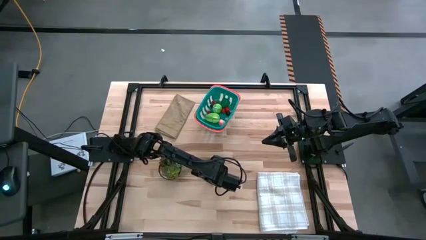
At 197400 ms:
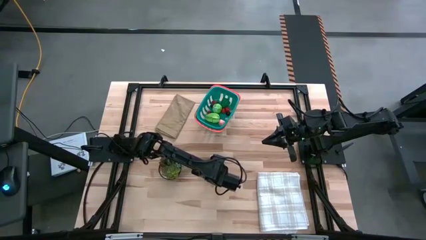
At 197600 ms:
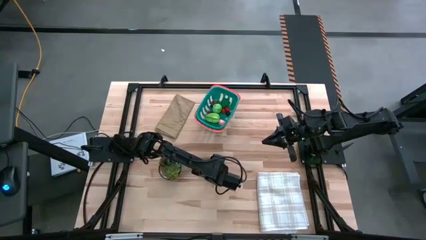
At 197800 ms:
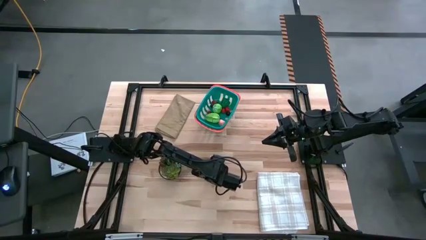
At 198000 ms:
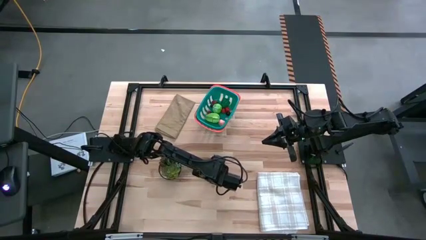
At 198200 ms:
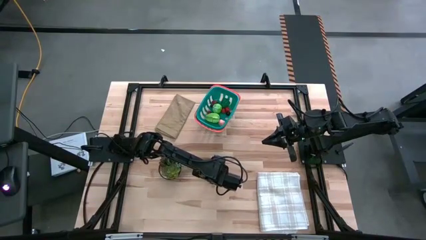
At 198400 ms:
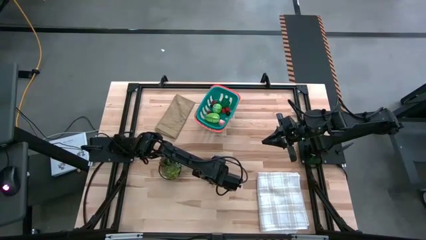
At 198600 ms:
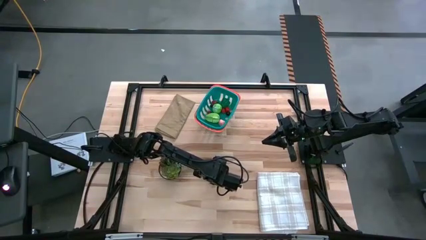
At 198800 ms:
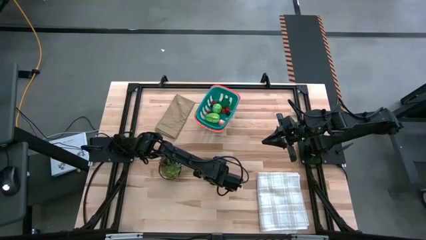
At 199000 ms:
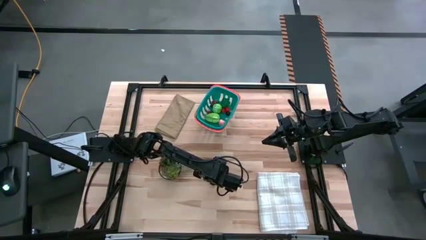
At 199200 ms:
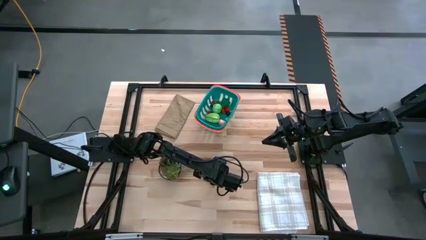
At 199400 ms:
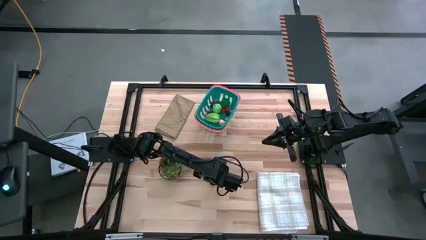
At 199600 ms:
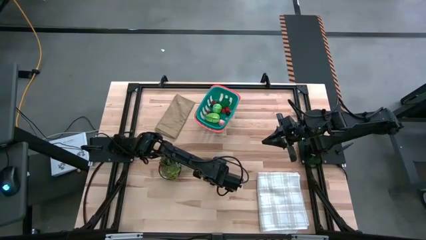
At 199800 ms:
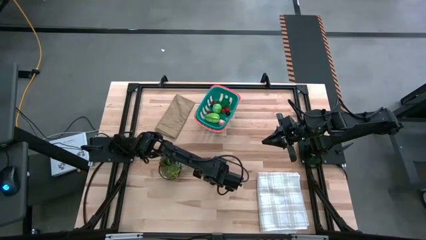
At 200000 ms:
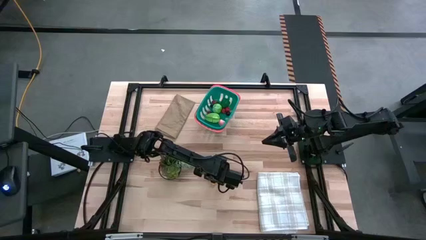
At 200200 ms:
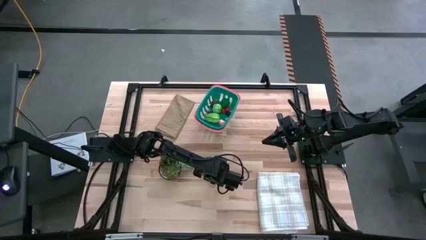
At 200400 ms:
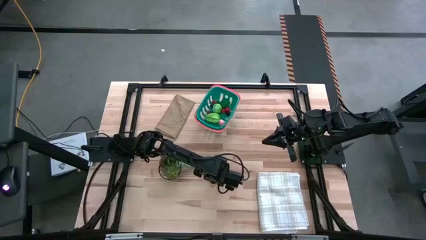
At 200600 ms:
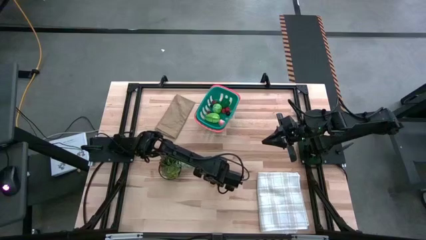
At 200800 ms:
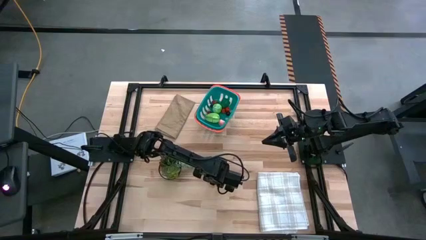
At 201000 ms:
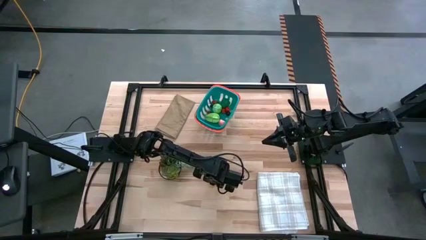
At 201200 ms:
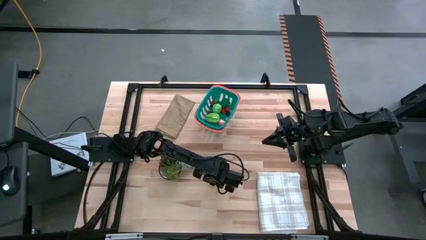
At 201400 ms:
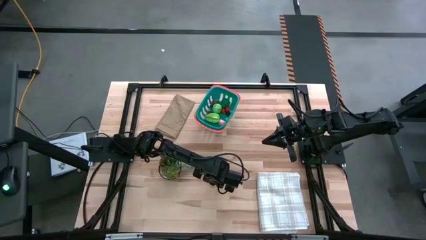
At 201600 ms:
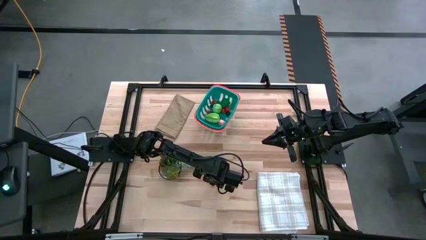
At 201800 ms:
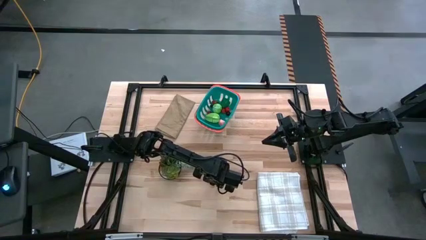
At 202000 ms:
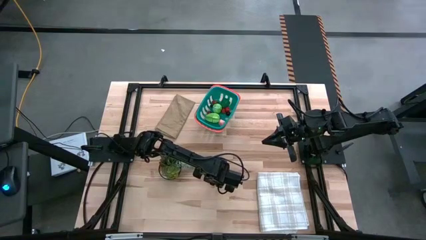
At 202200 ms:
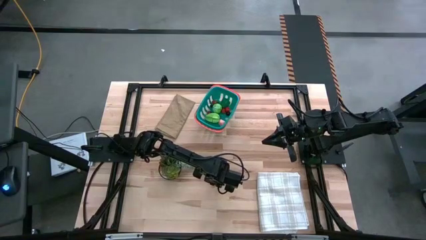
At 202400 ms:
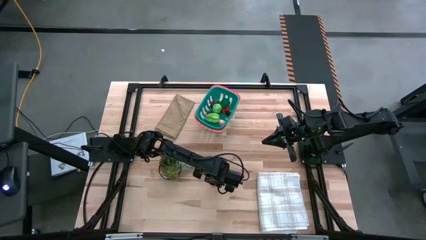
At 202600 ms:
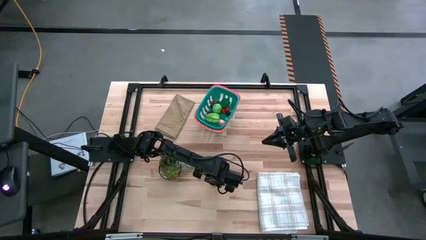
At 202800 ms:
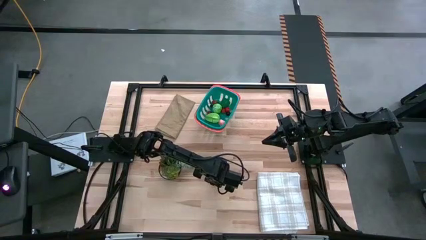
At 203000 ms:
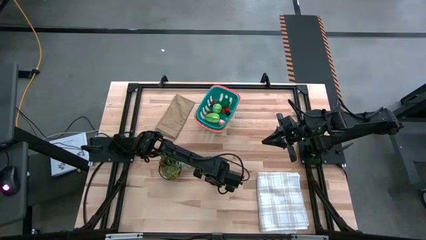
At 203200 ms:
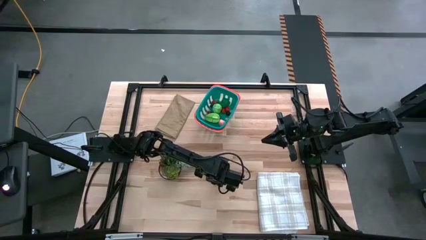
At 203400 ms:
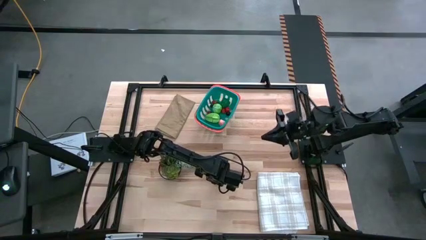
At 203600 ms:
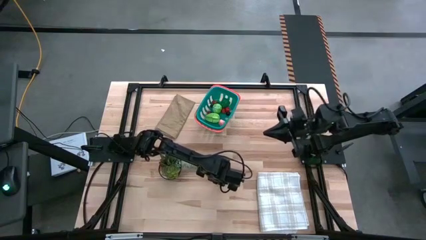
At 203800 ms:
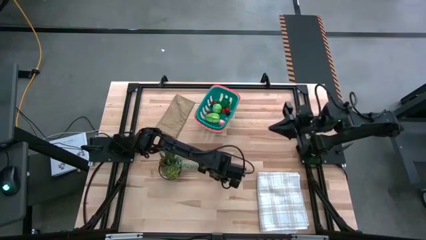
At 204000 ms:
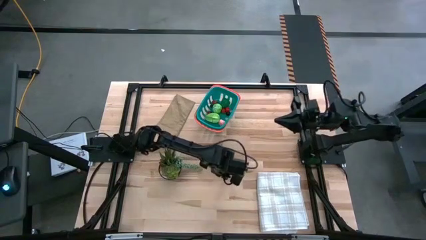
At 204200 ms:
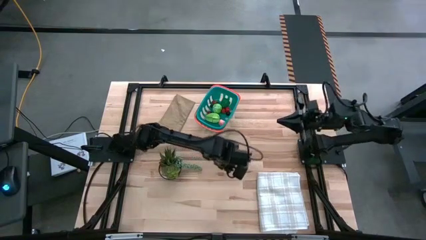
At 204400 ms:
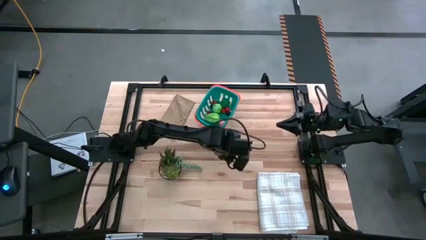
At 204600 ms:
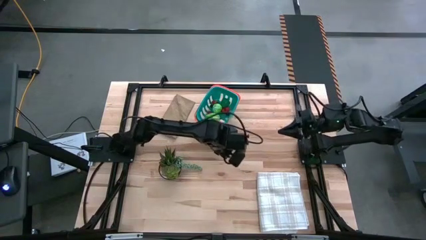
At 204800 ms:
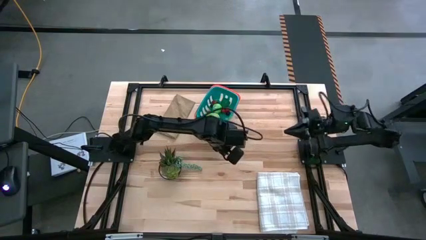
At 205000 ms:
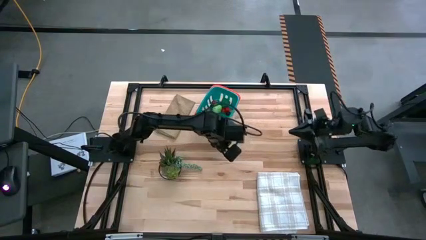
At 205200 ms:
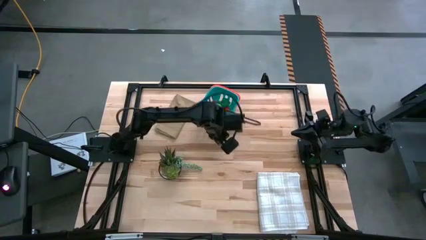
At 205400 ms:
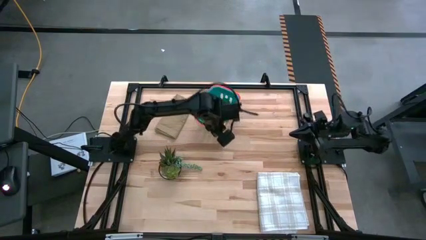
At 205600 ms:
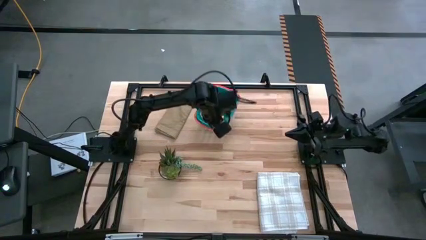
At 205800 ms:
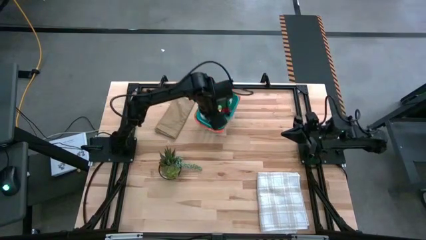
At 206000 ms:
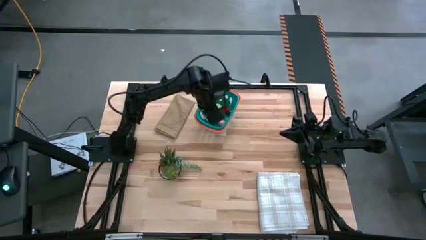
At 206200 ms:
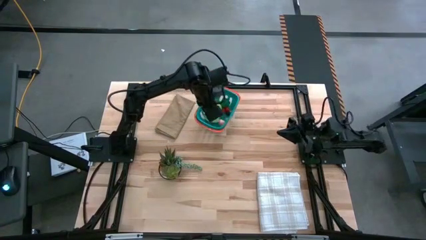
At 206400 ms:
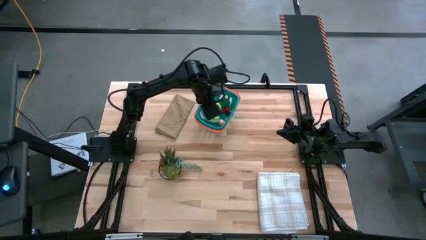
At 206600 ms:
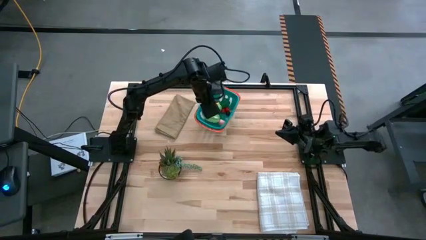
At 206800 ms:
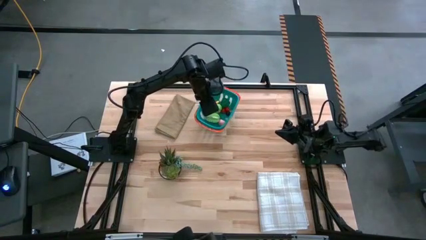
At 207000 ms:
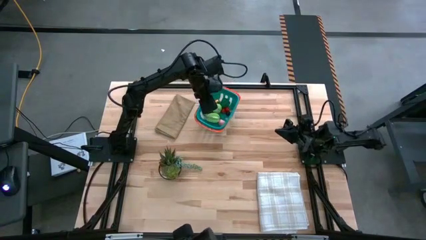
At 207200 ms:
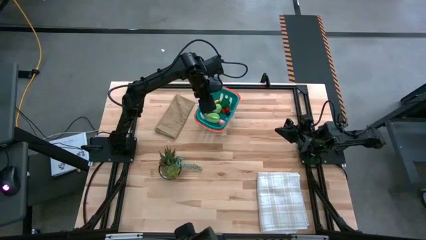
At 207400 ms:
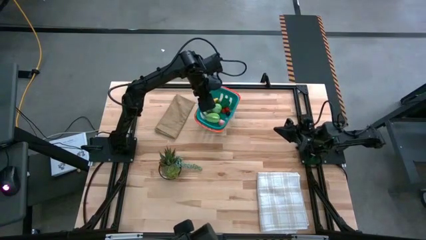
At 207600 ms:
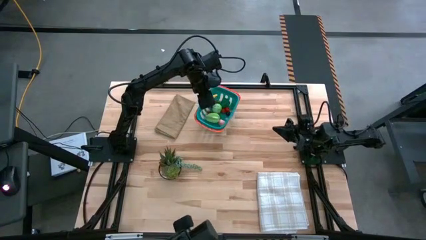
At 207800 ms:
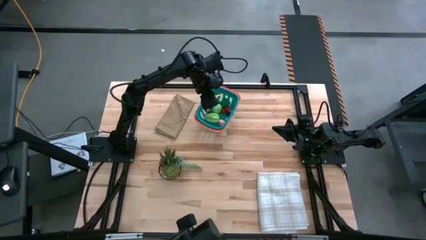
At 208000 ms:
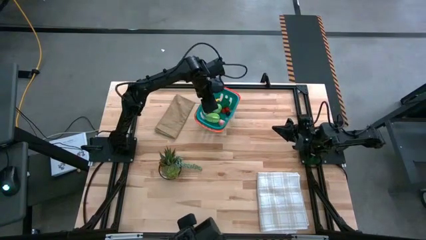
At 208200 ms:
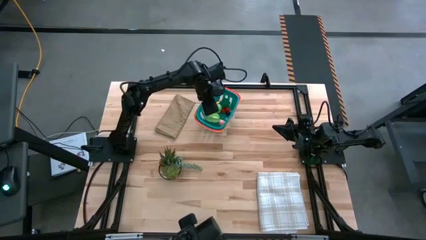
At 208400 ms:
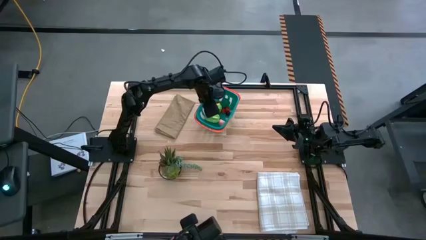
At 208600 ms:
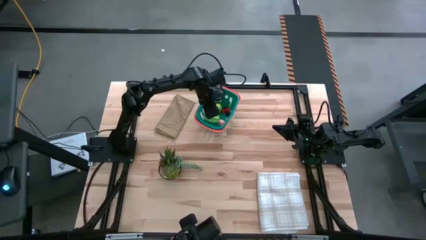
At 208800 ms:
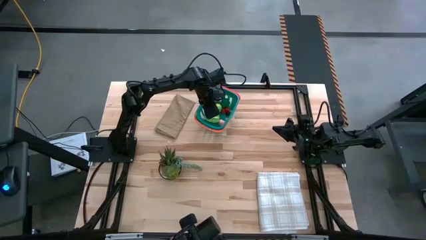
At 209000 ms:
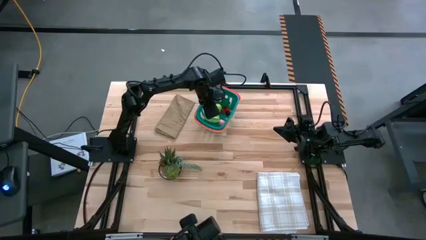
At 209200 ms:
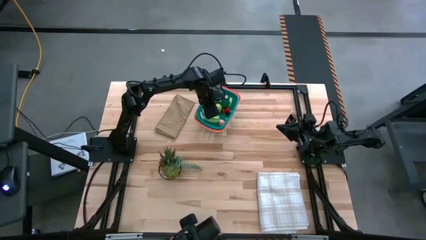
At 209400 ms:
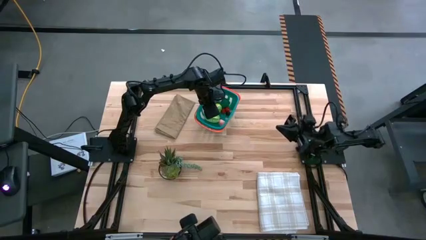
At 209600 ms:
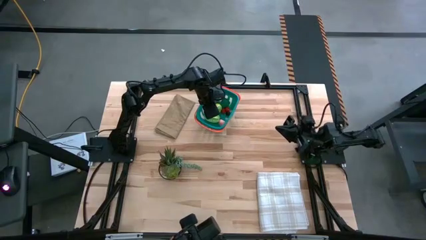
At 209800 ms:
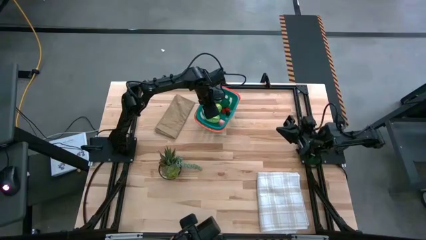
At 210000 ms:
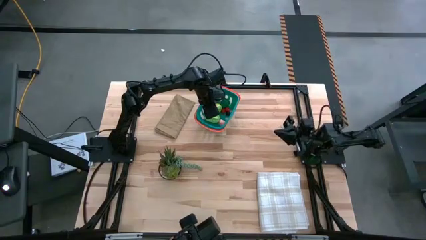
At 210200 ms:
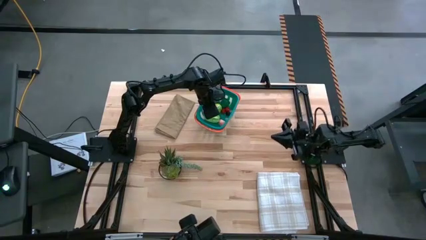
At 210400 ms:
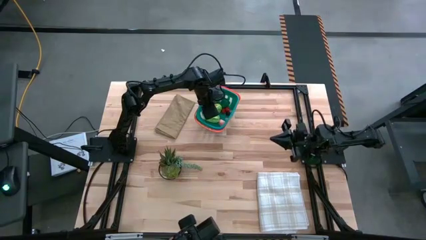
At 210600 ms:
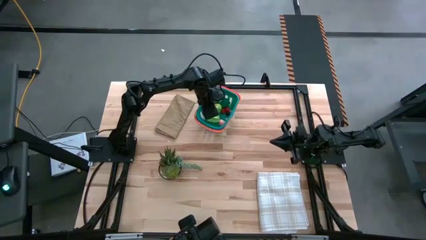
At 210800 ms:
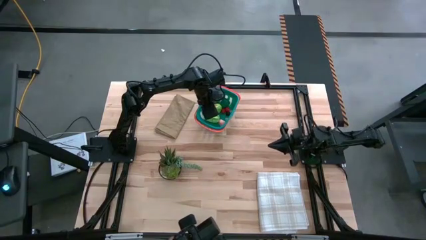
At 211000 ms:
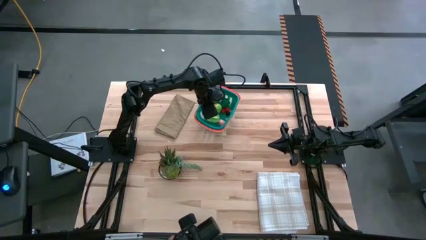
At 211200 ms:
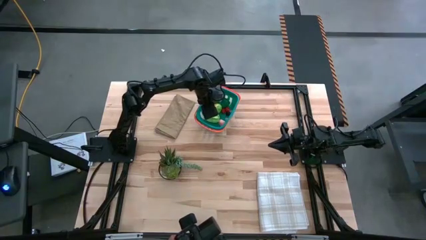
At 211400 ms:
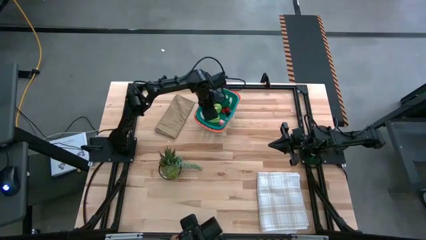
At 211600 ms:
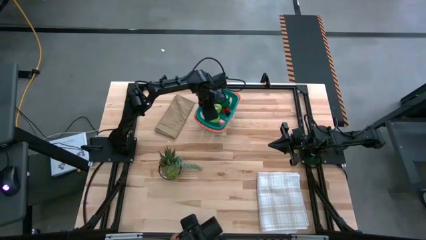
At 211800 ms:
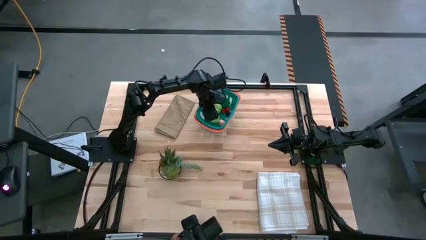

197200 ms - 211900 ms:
Task: Pick and placing Produce into tupperware
Put the yellow corn in the green basket
